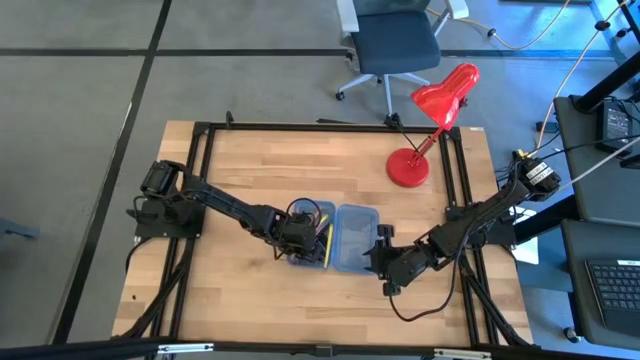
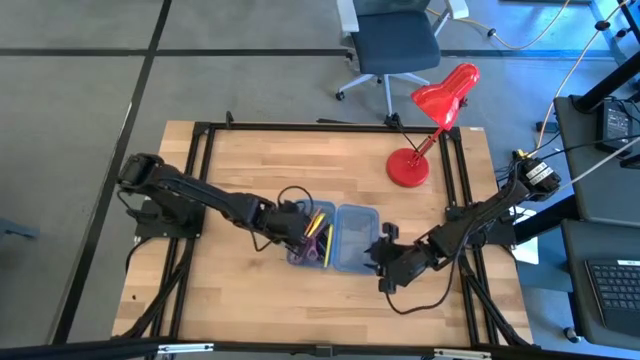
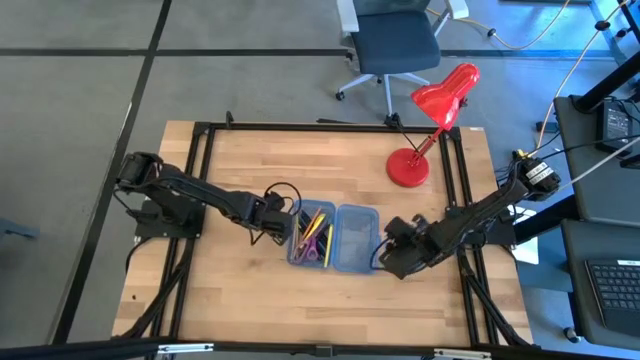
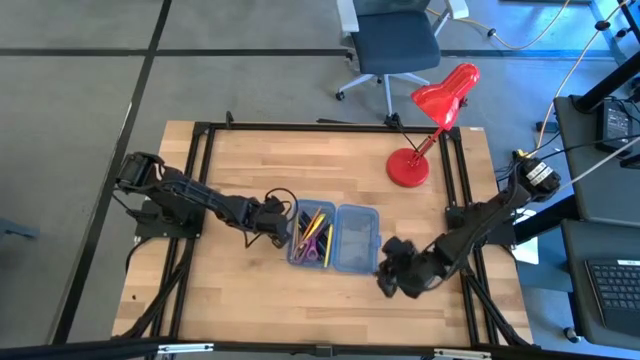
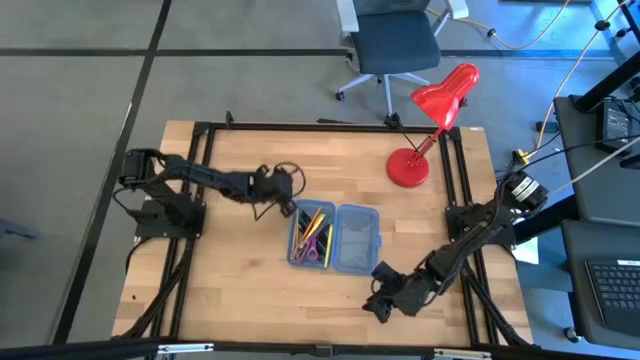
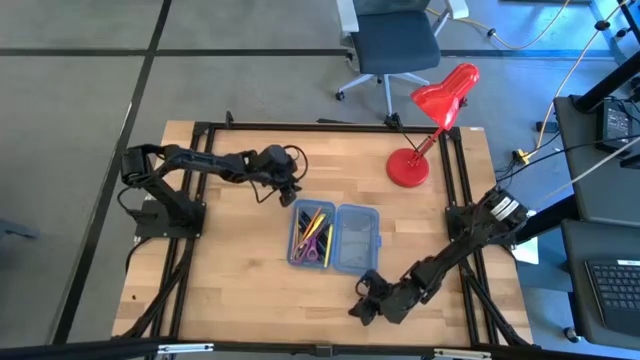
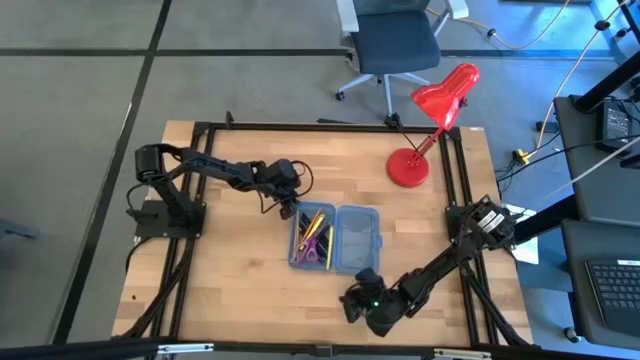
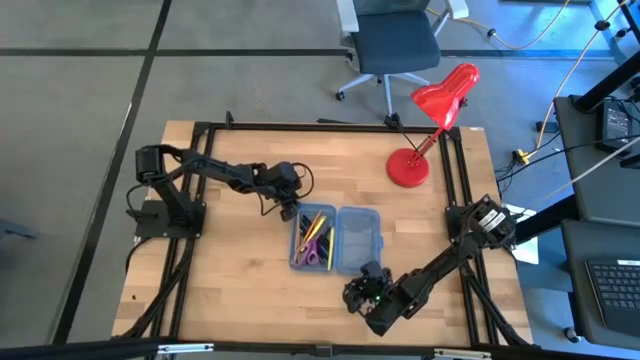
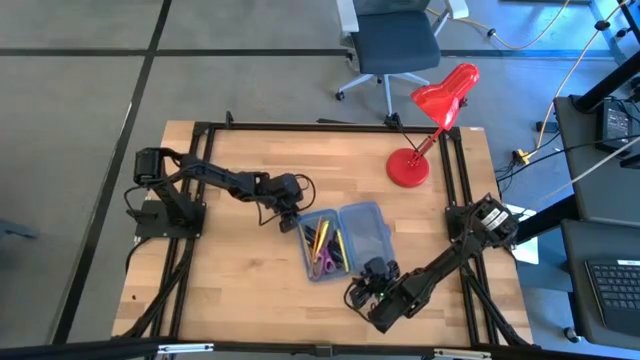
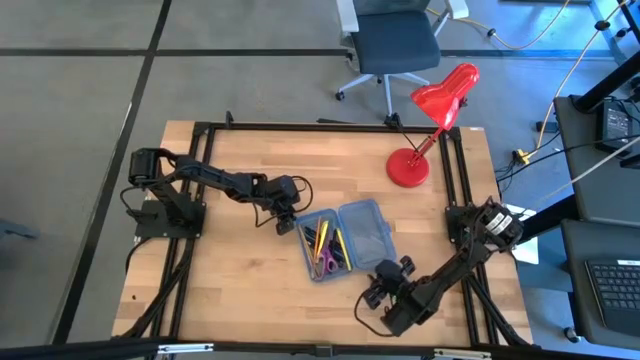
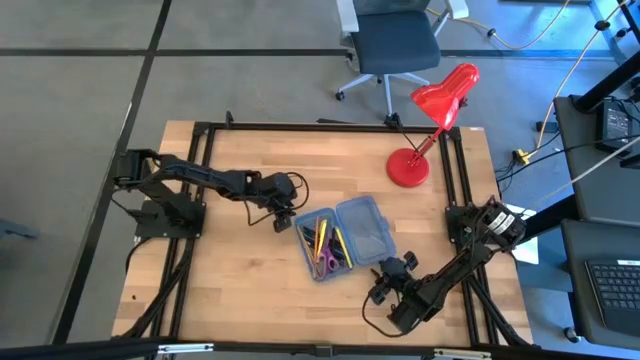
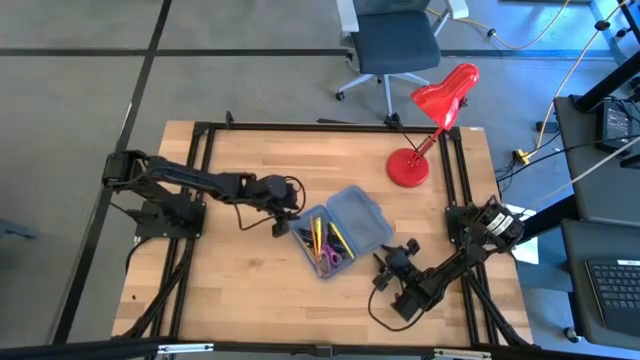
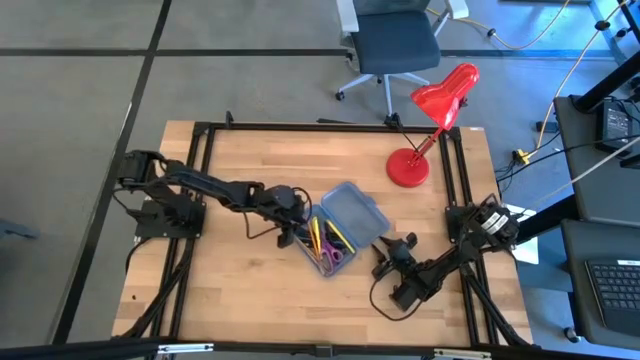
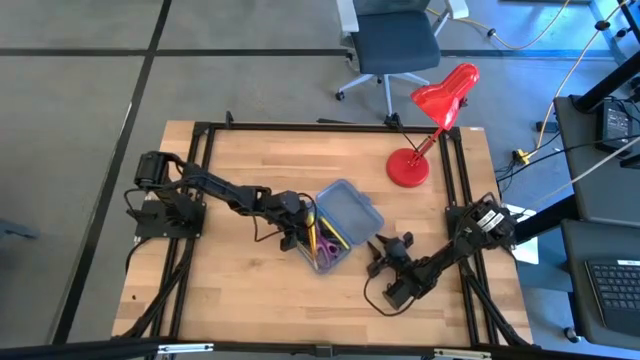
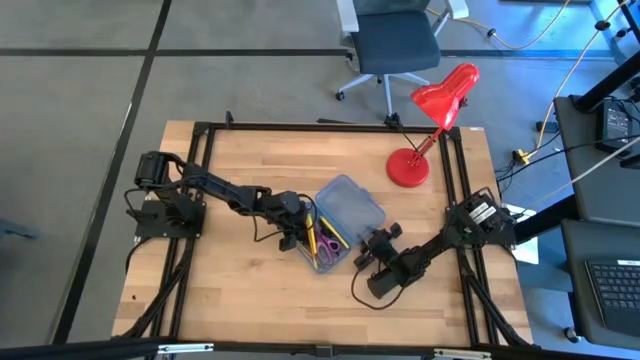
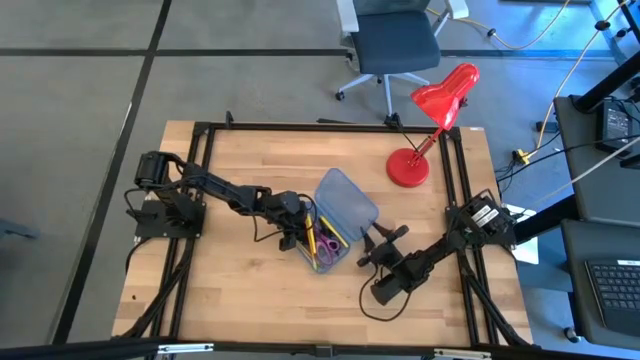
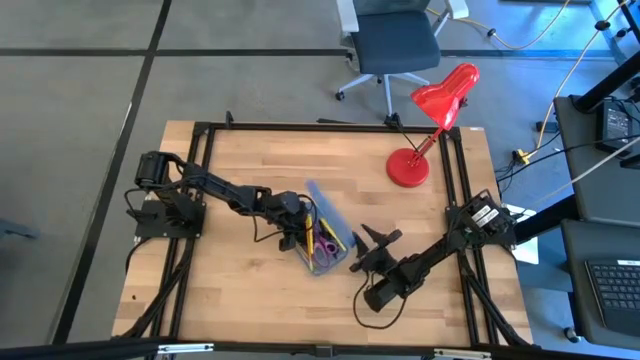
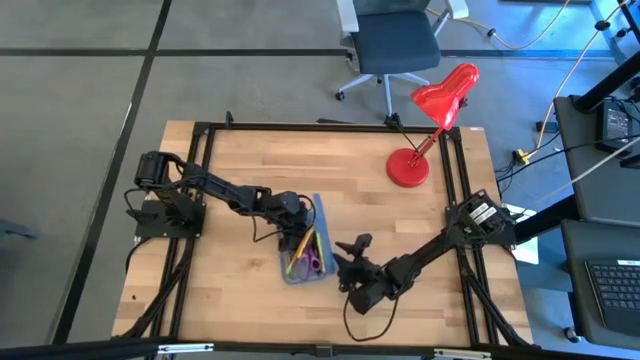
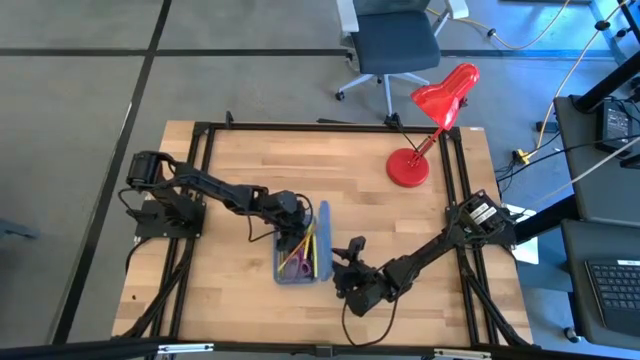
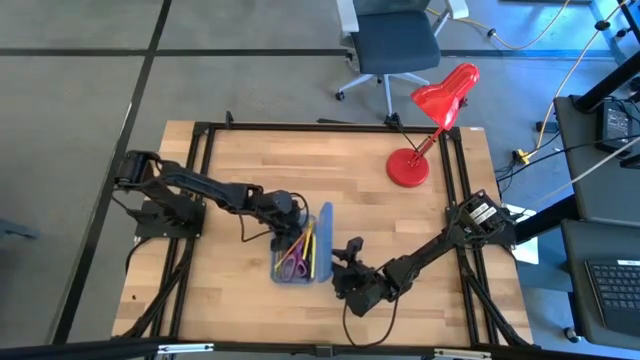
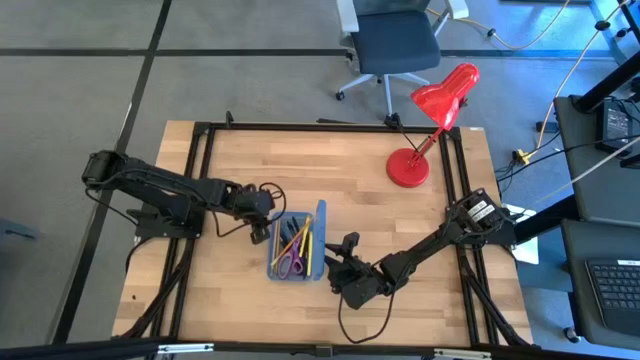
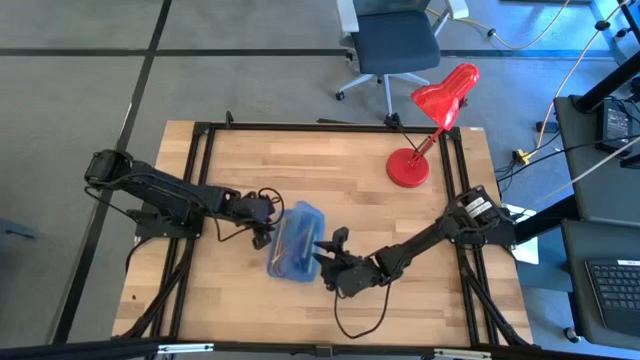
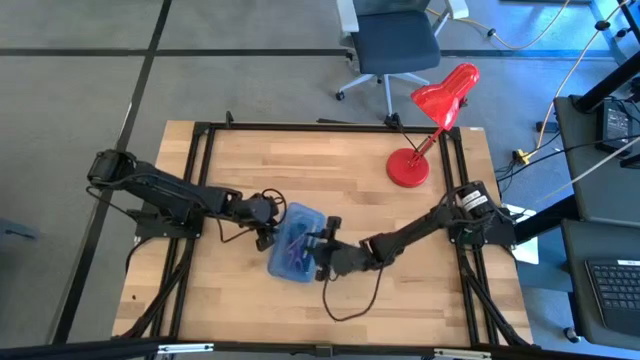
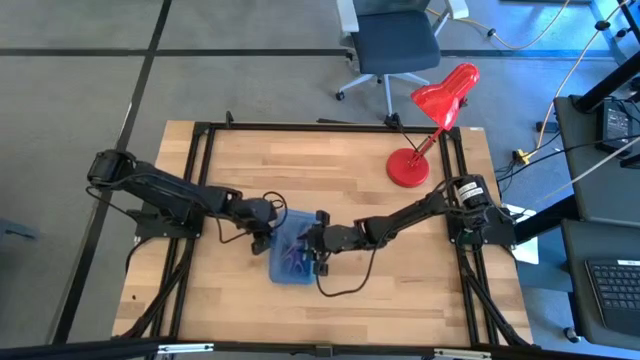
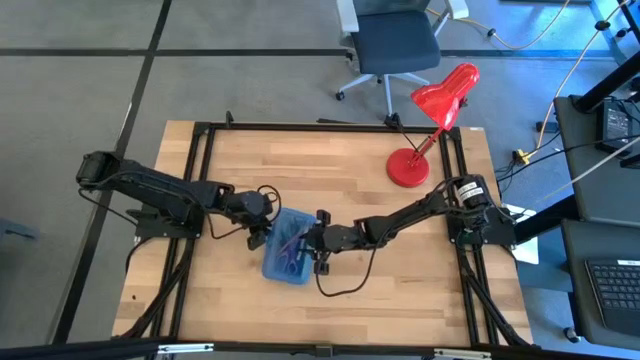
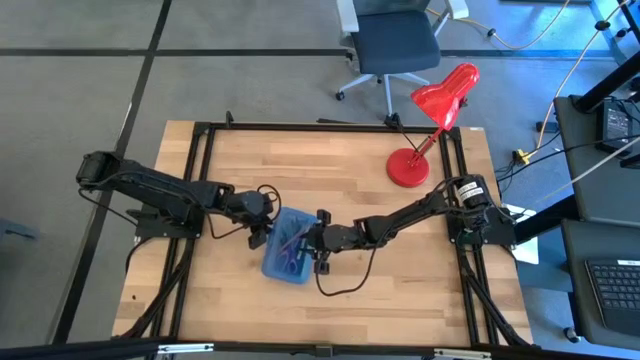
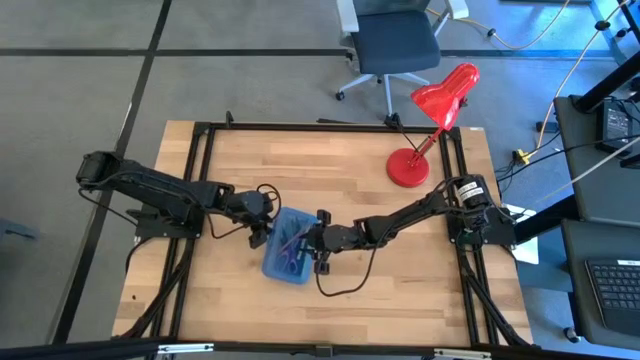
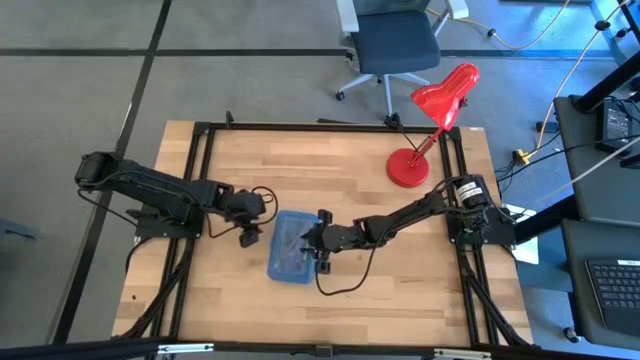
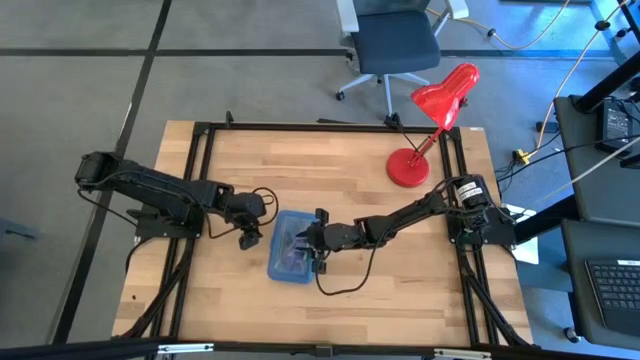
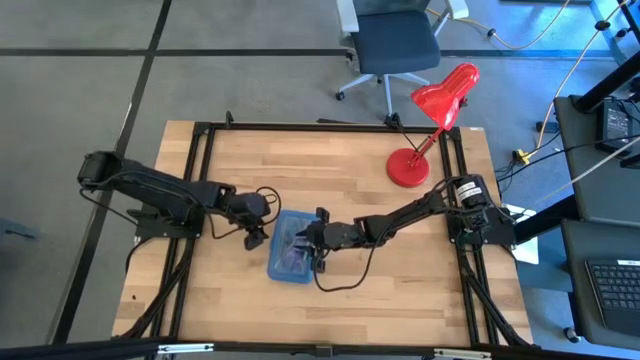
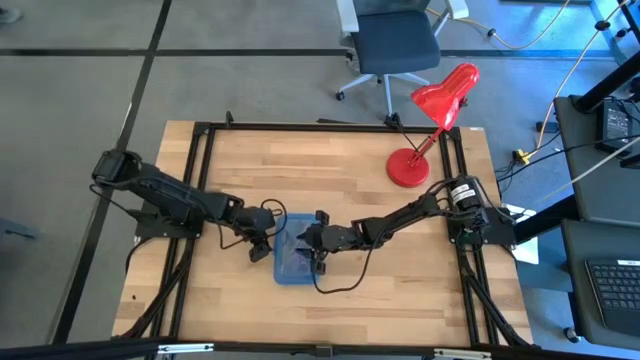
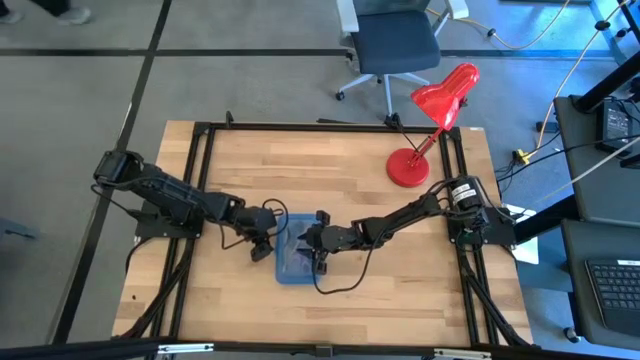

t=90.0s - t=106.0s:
Task: Pick & place school supplies into a supply box
Close the blue supply box

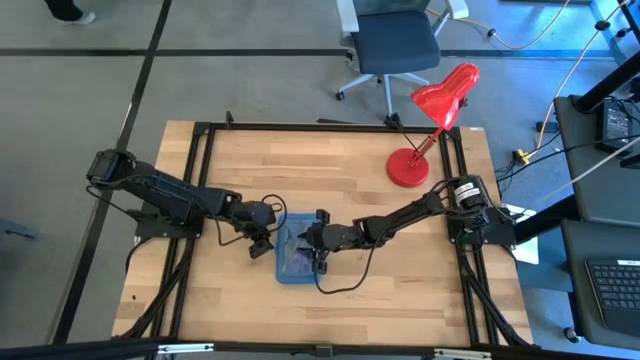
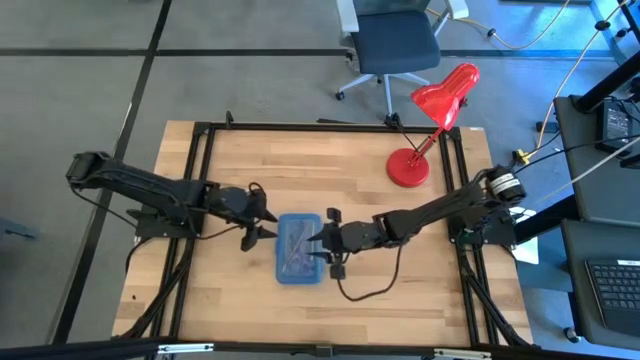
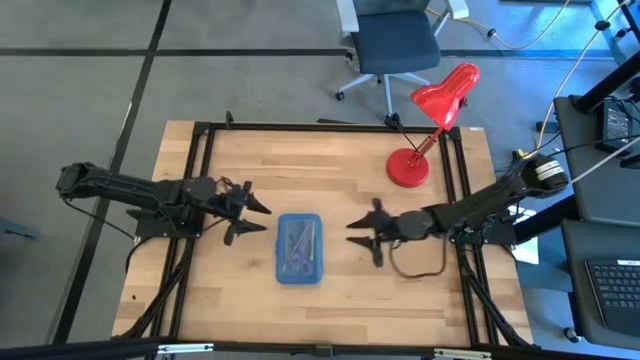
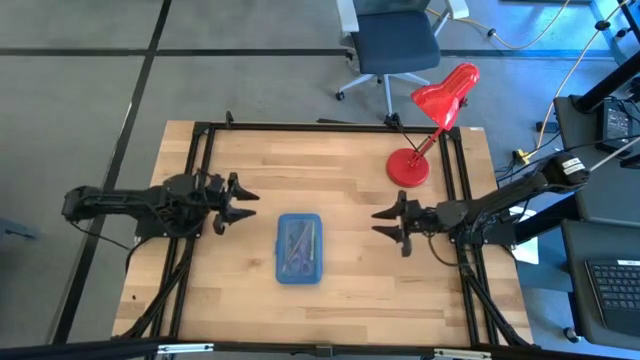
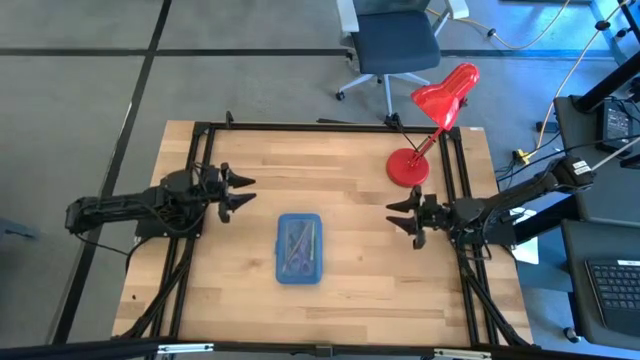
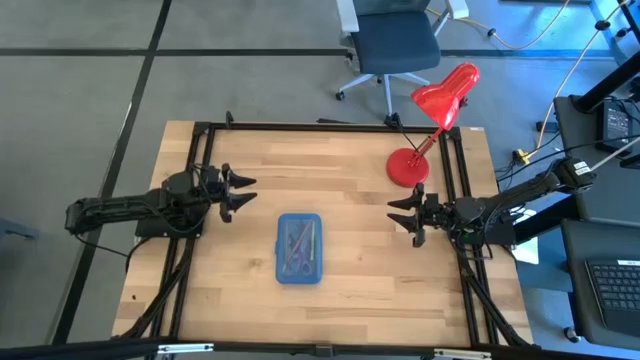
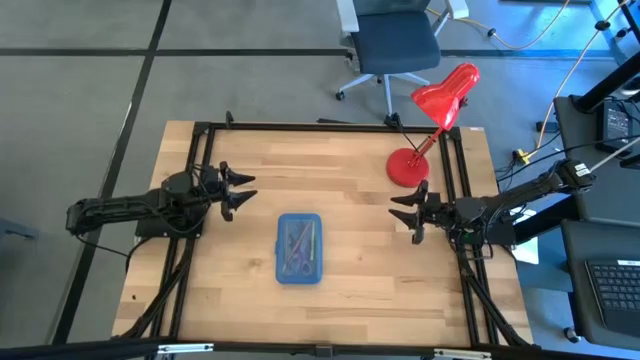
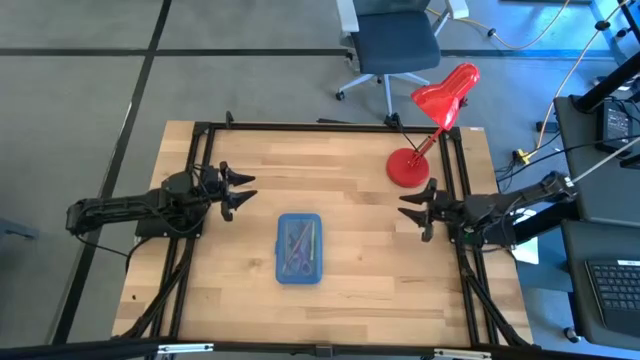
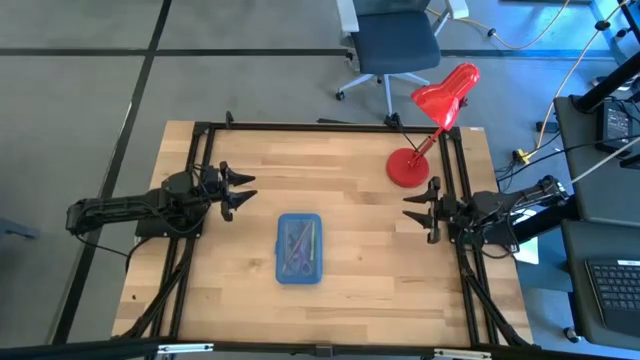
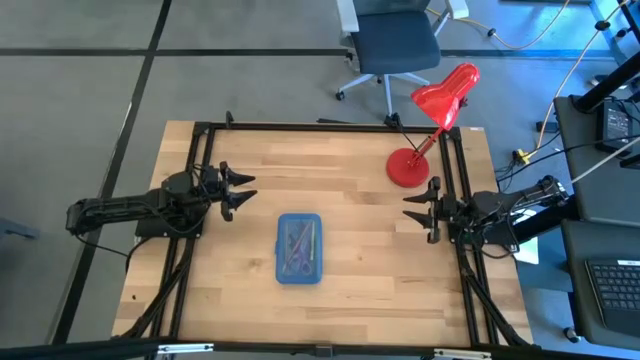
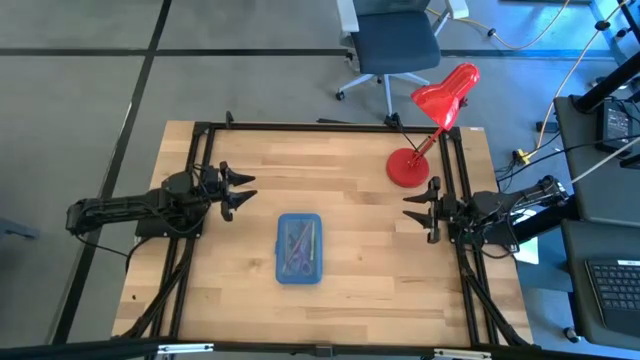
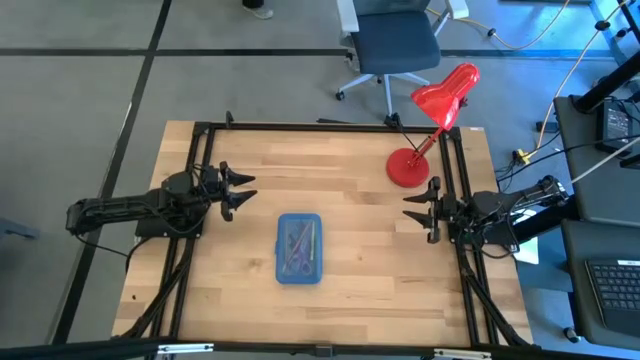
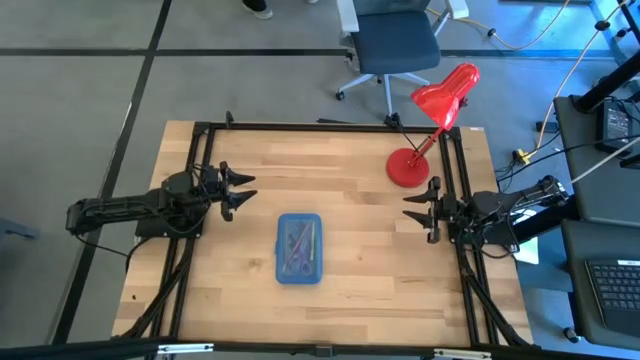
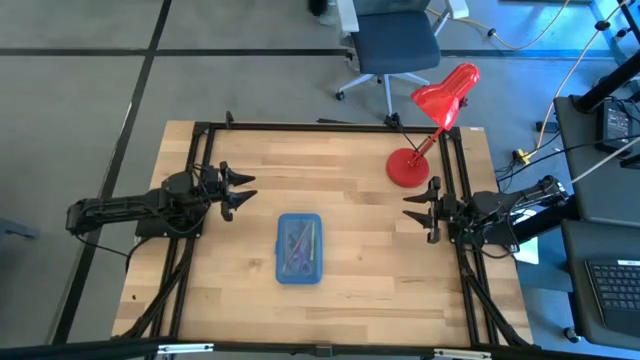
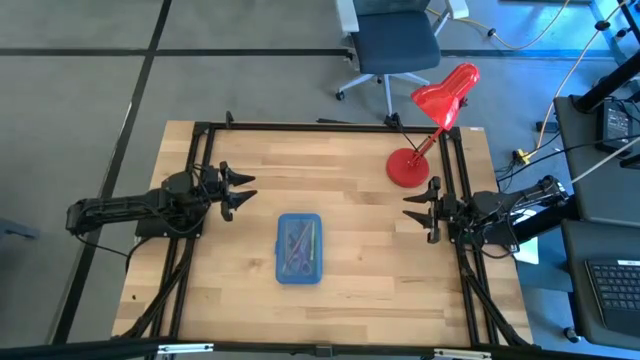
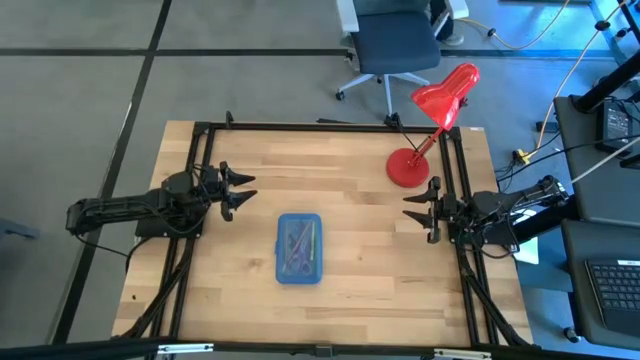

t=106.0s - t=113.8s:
Return to Home Position
